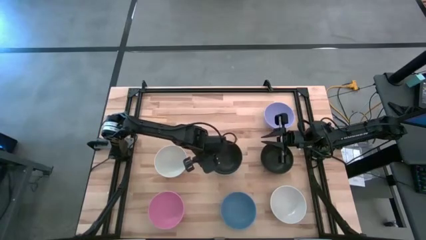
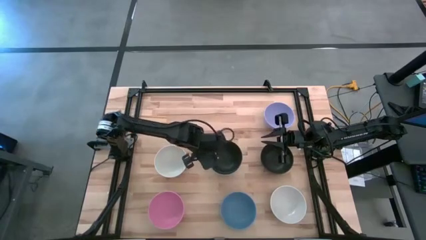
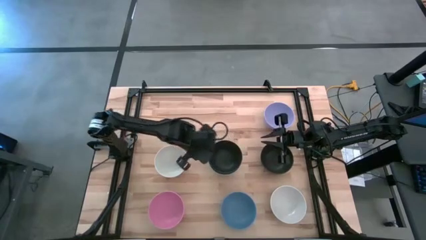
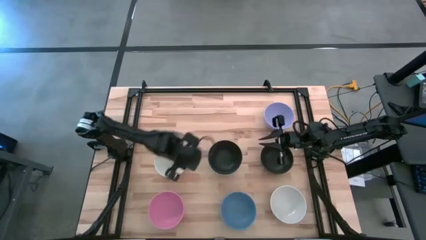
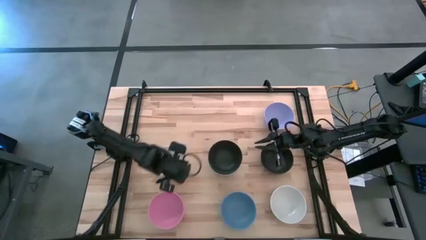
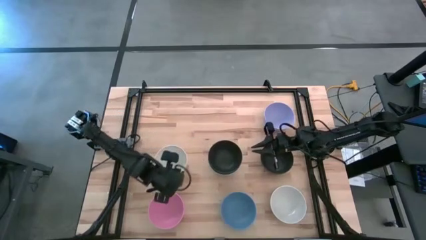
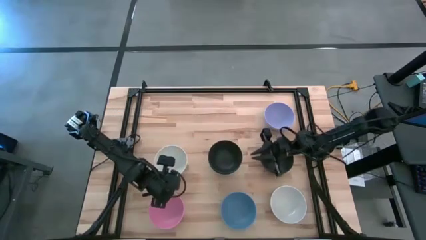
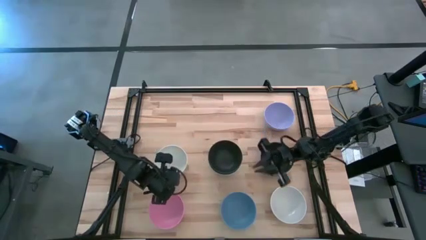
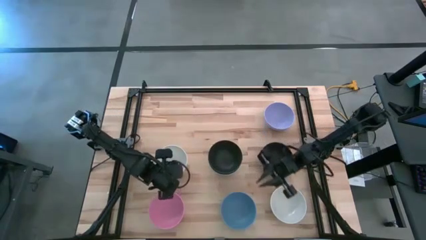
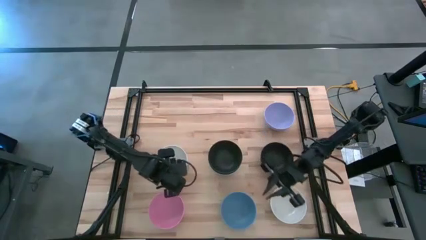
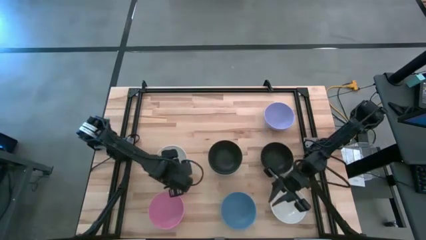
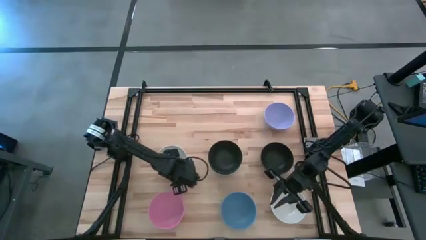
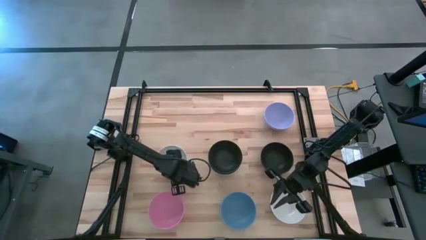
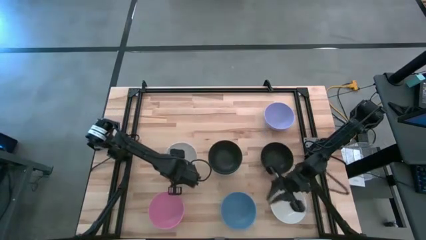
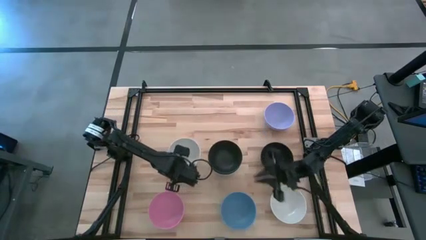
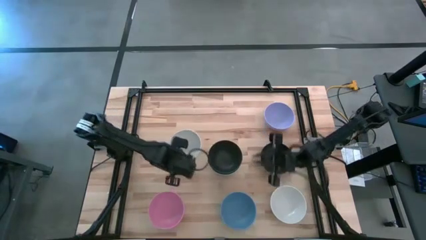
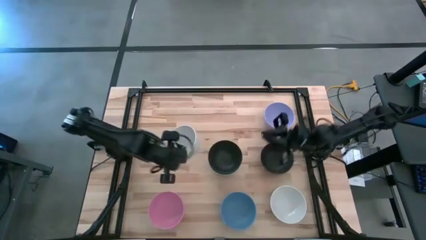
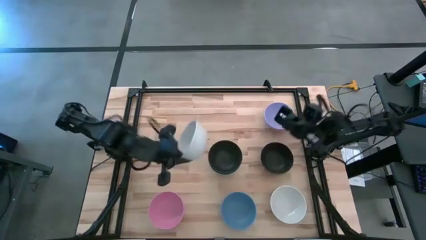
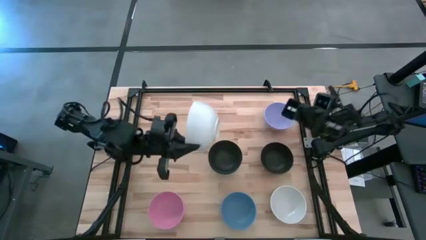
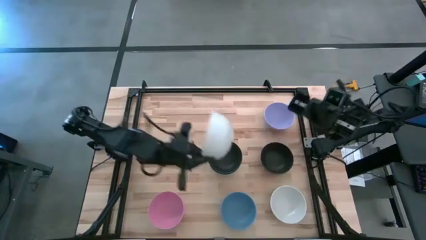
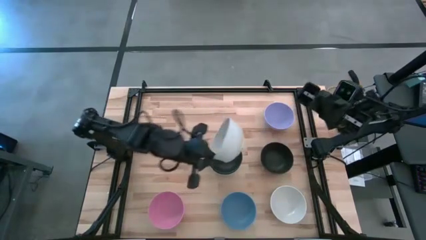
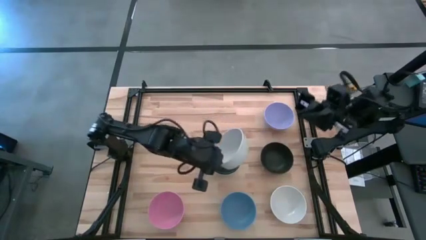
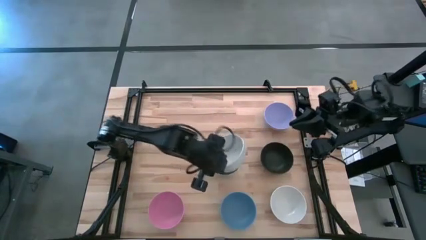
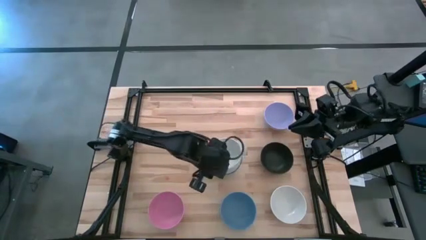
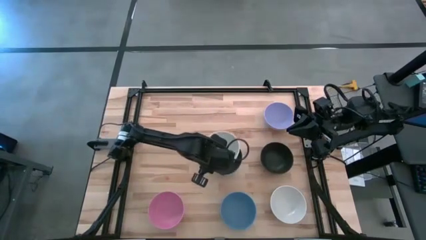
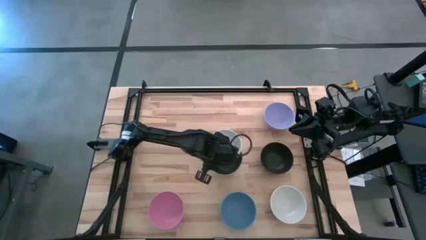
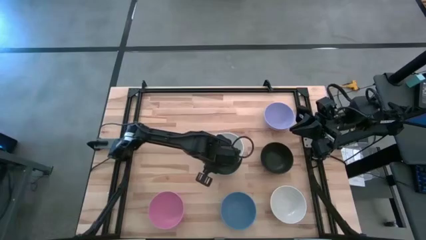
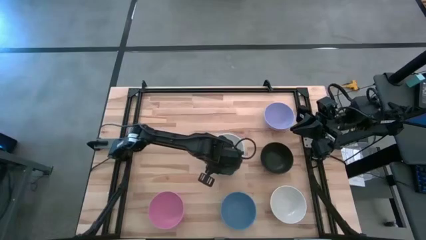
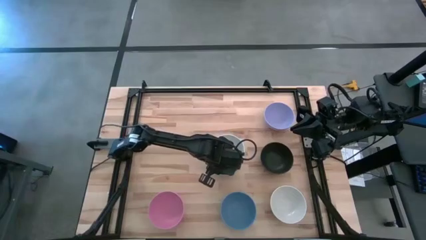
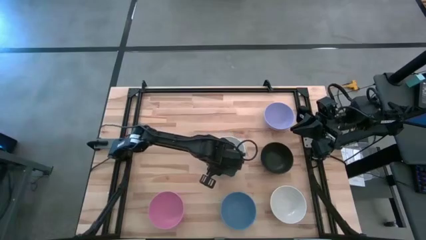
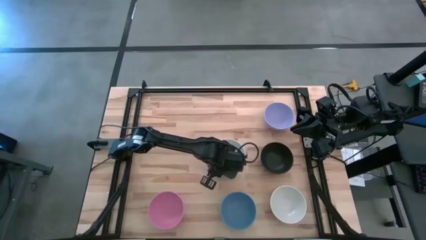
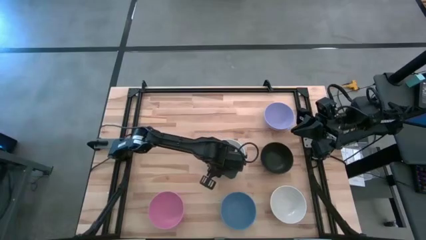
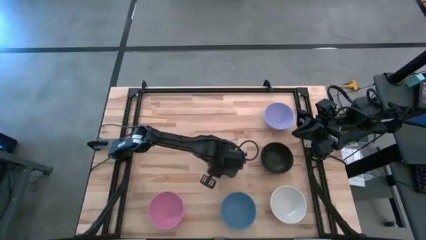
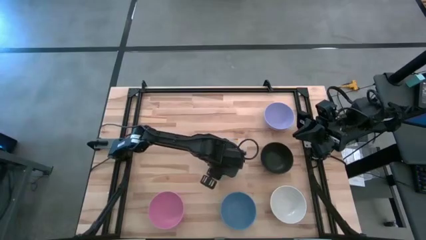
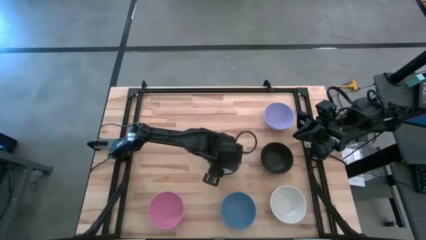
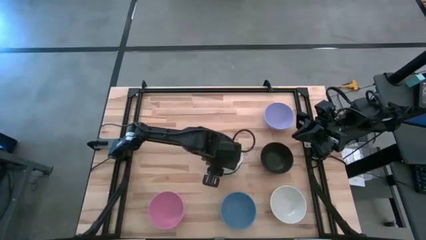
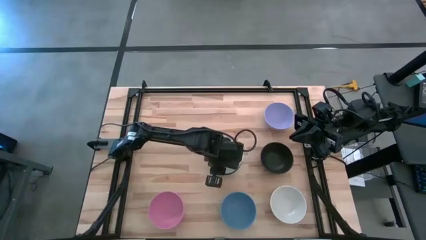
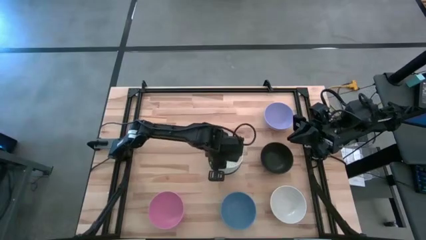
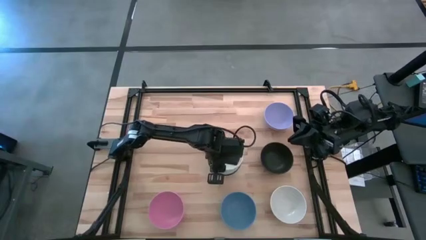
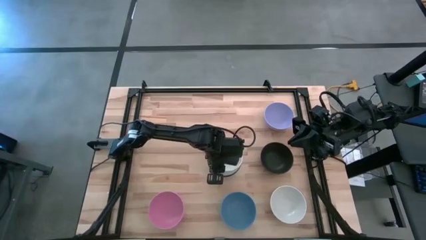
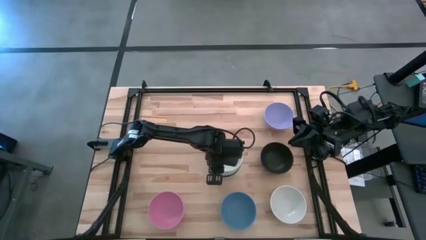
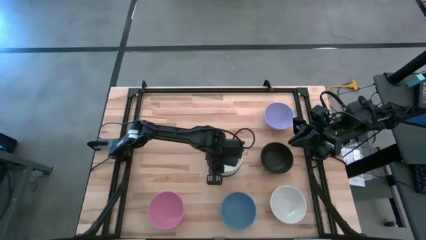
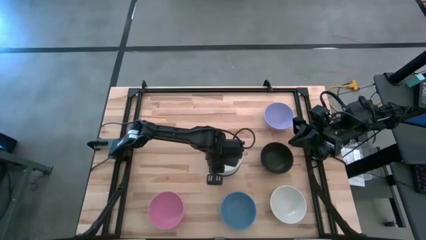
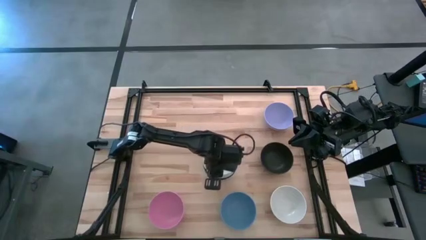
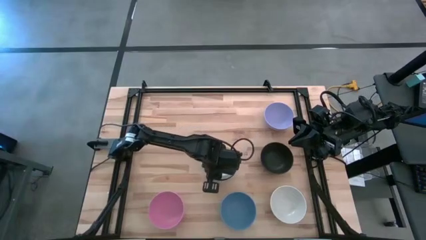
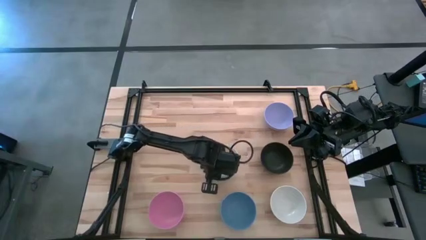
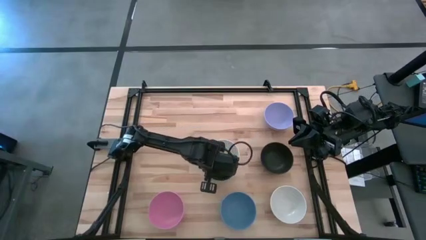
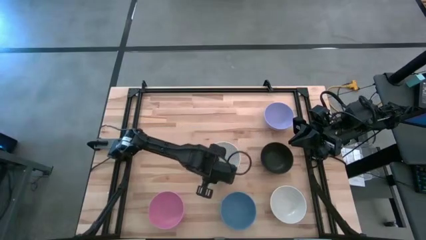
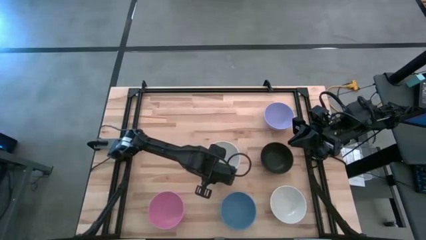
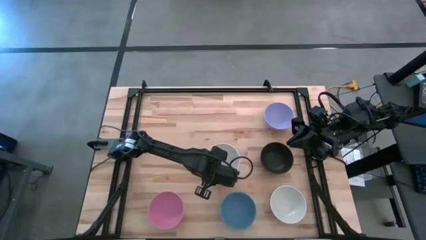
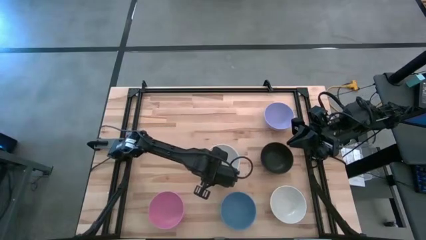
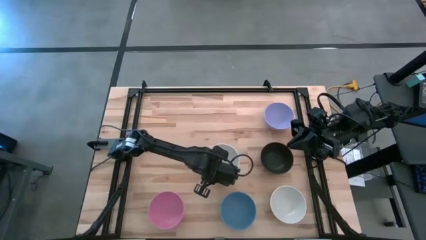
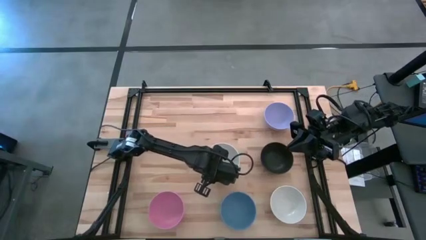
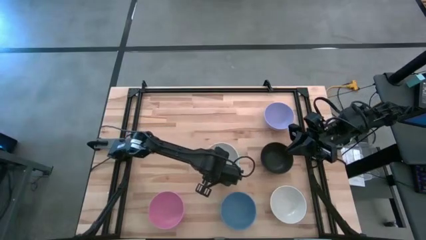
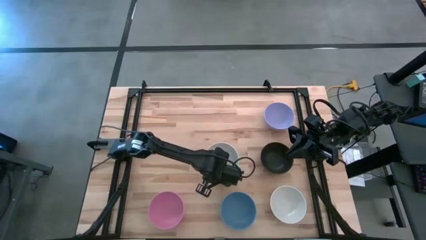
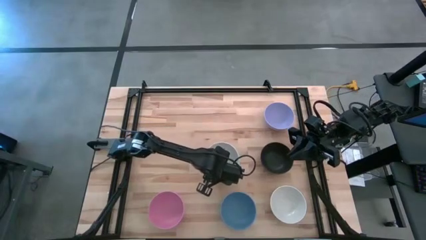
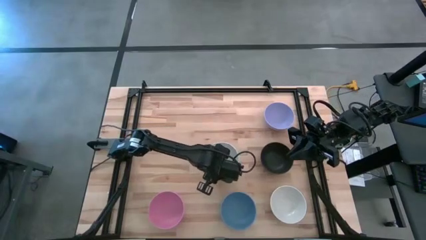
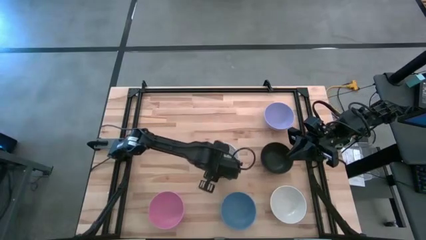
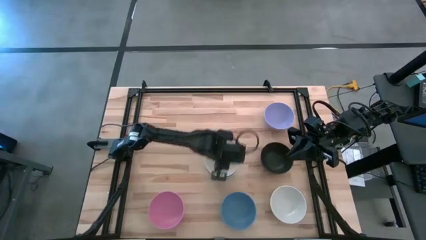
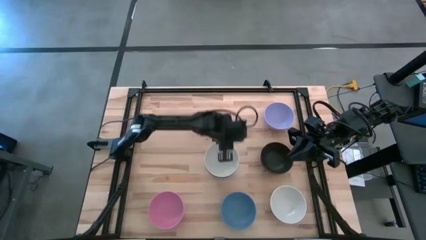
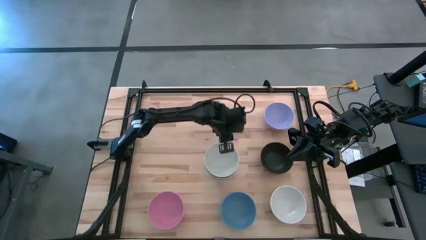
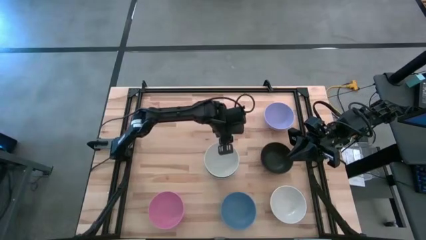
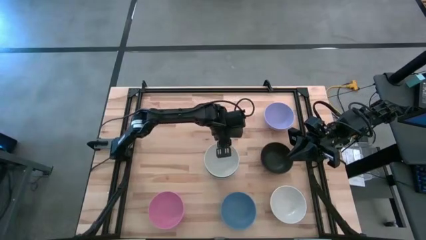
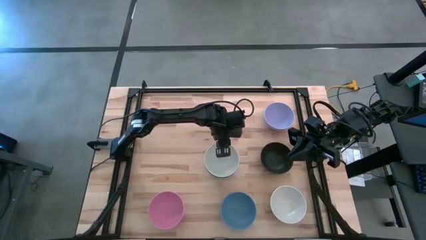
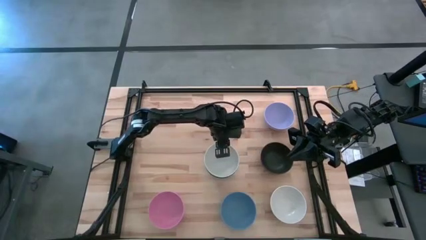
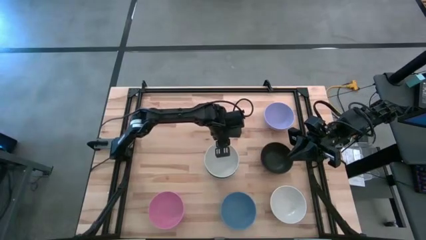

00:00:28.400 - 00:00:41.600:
Task: Nest bowls inside each other
Stack the left white bowl on the left black bowl
